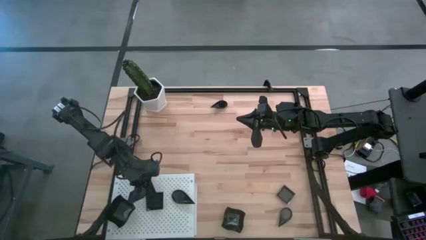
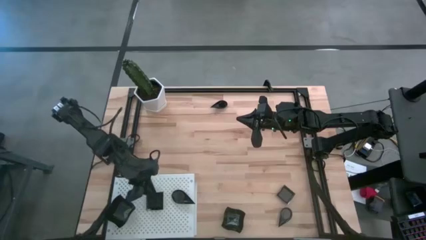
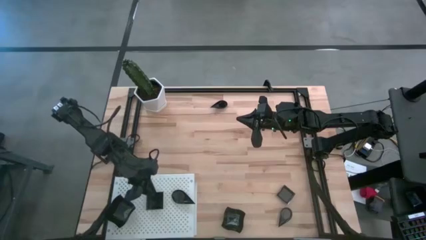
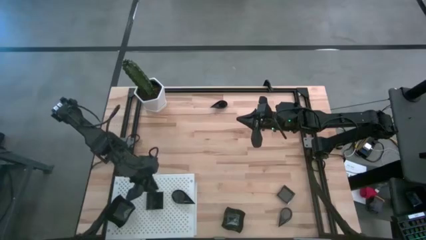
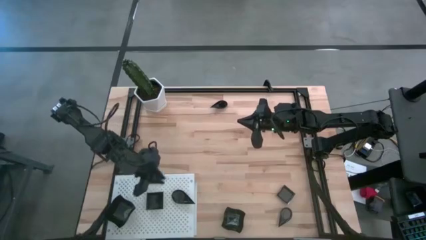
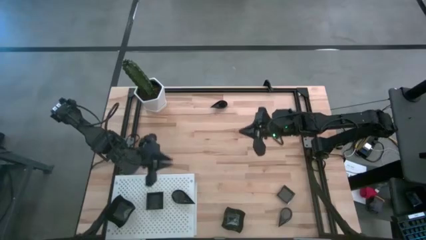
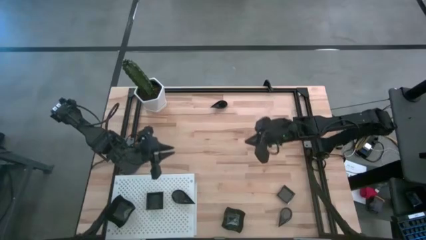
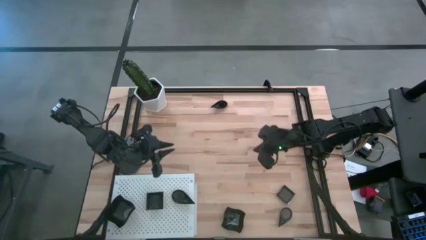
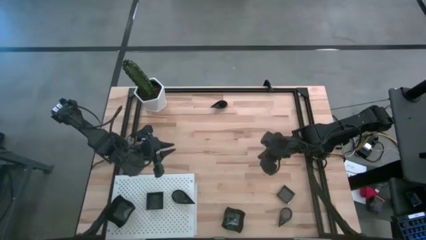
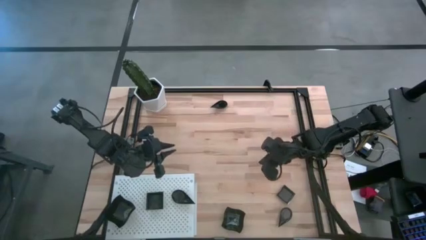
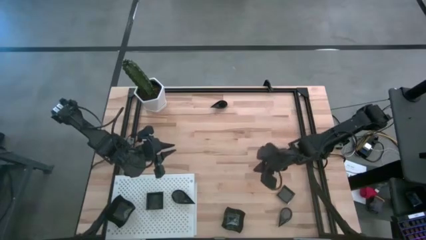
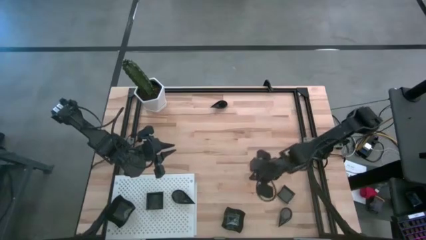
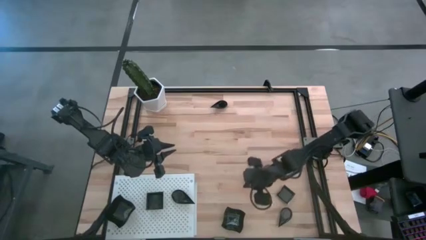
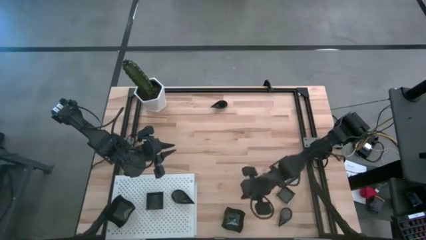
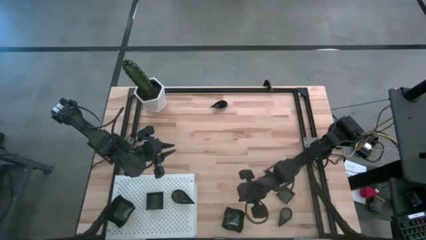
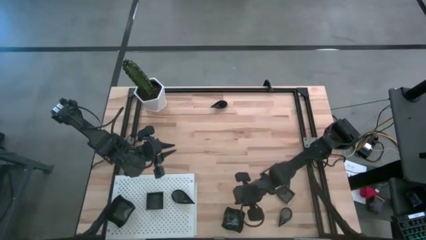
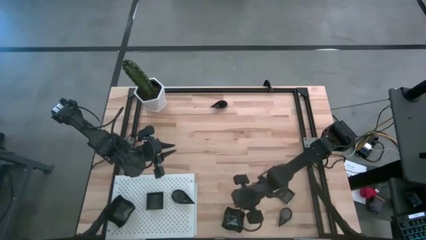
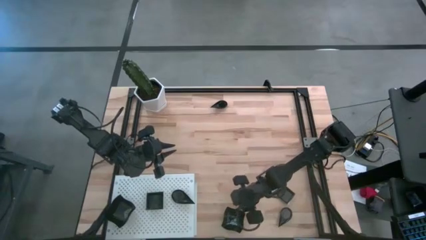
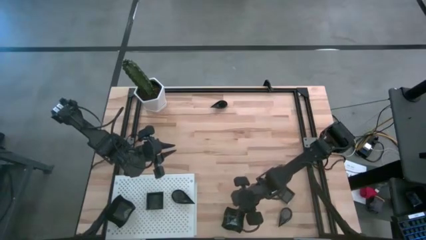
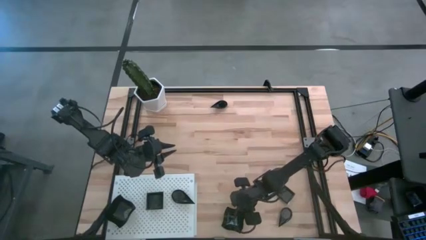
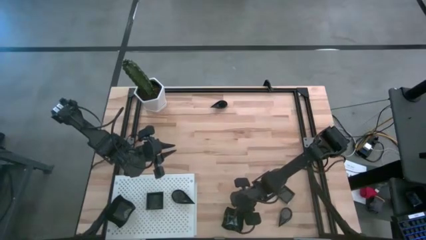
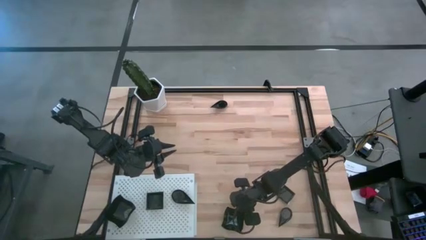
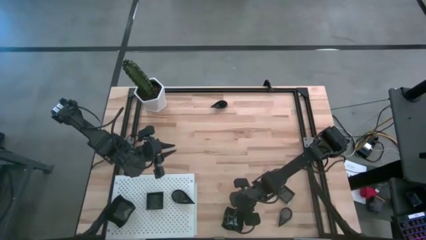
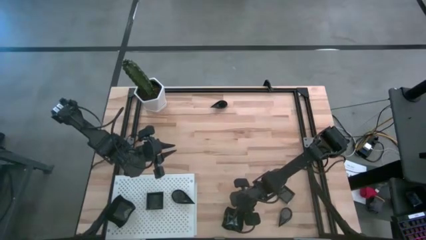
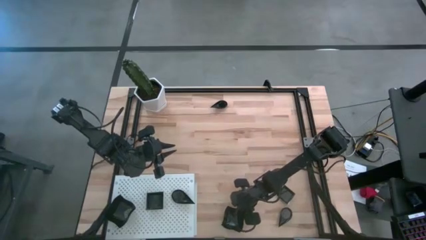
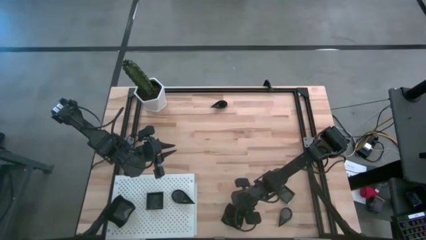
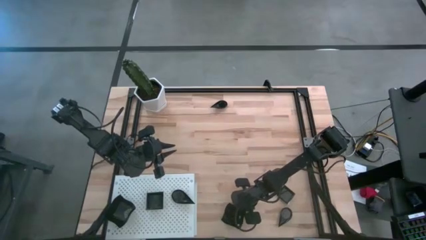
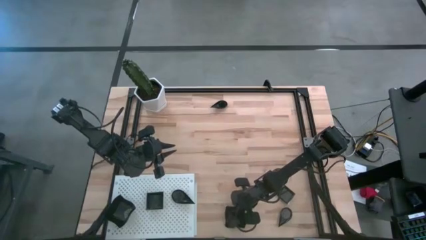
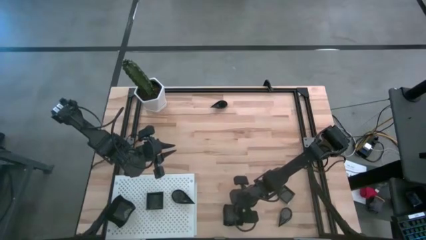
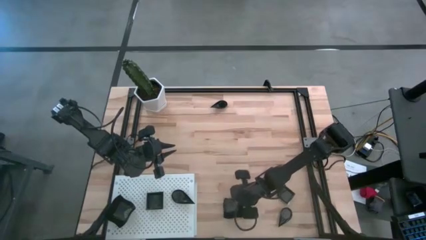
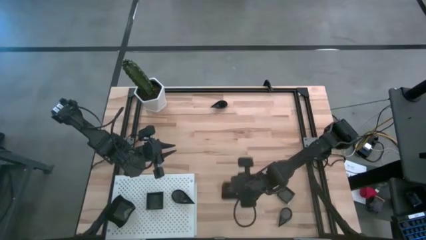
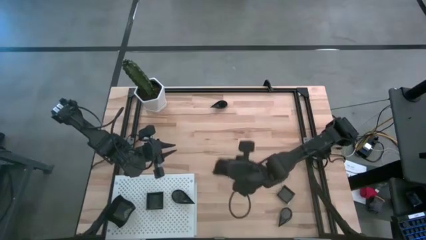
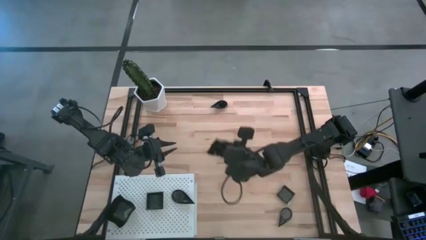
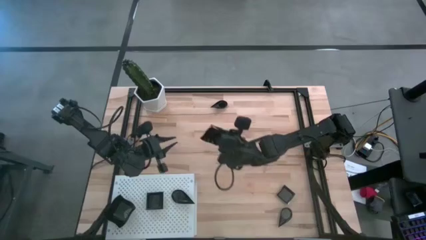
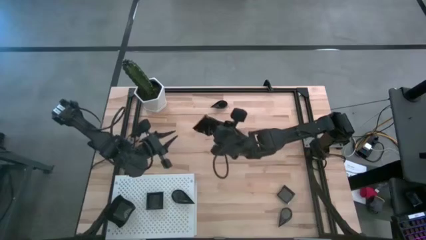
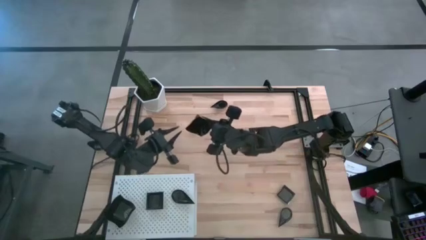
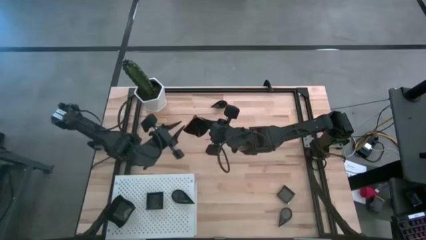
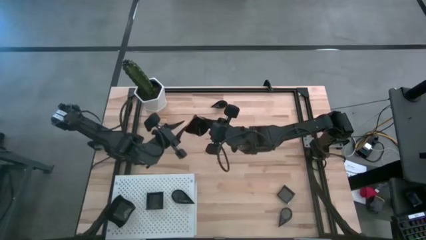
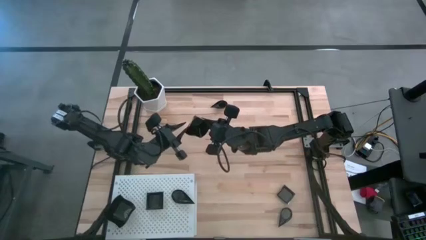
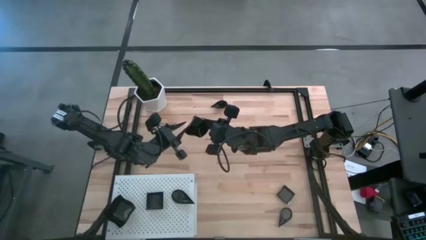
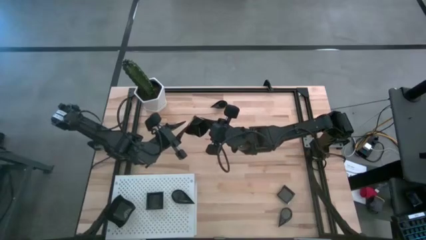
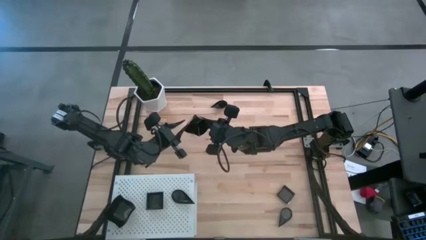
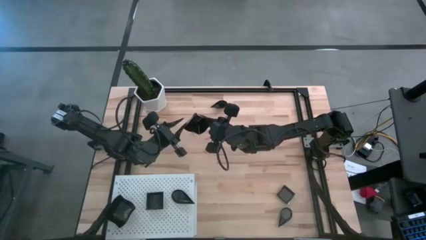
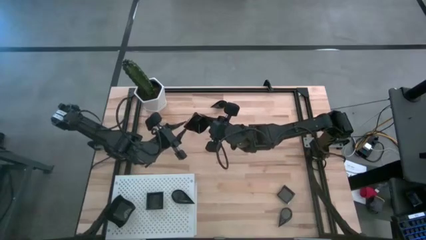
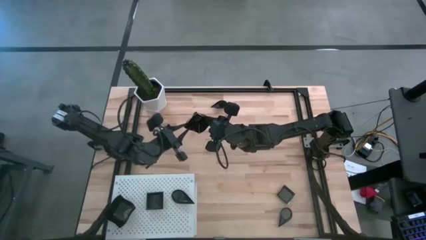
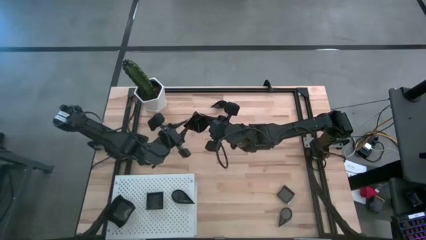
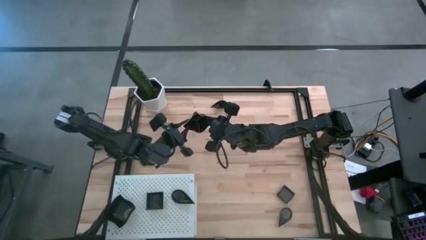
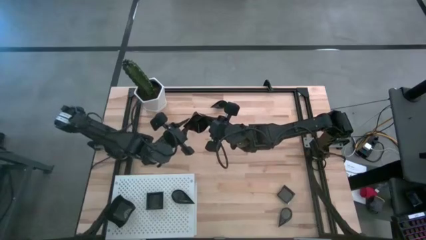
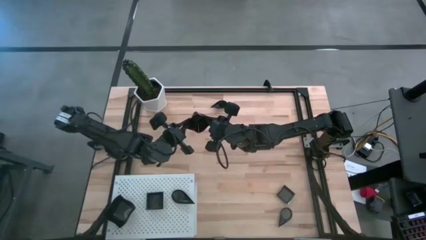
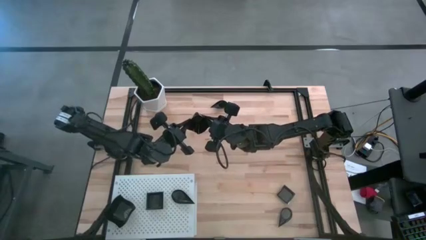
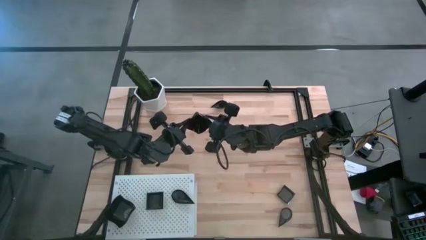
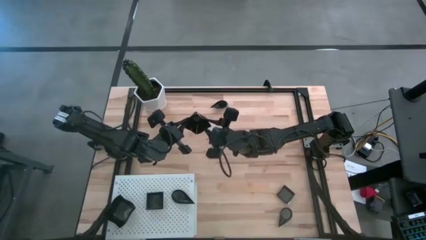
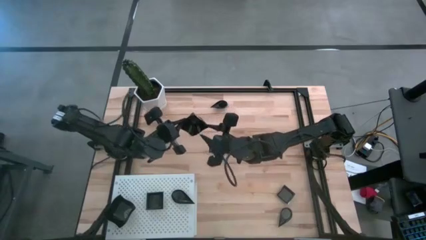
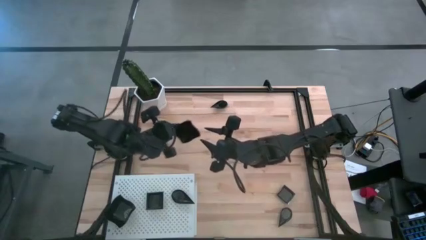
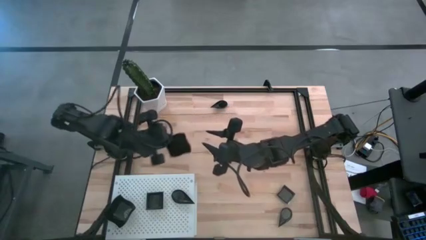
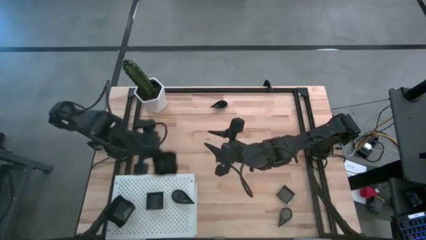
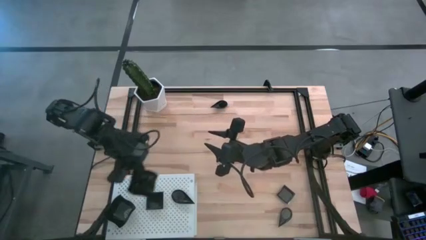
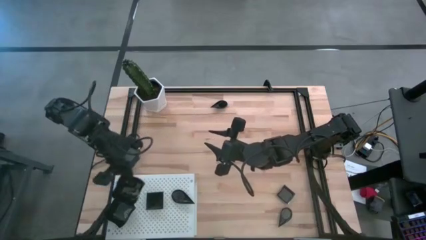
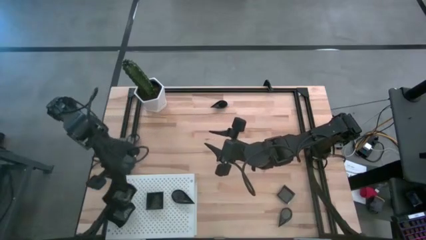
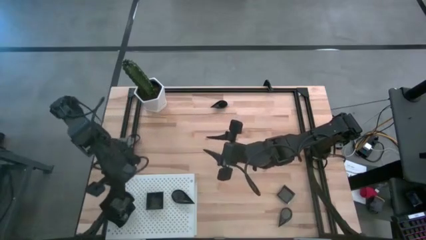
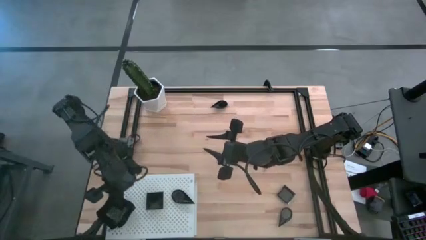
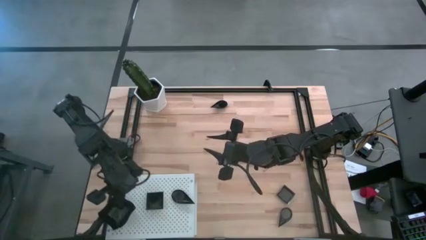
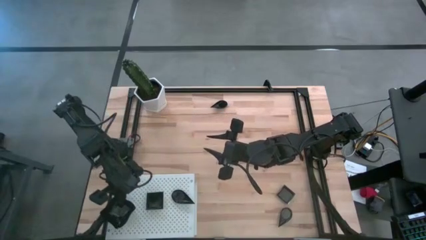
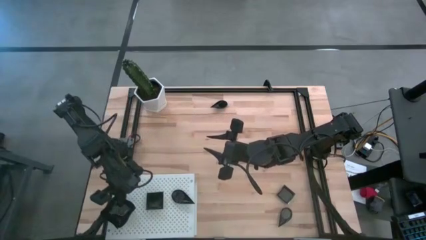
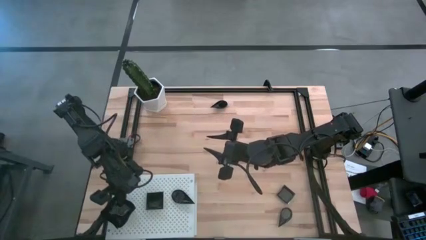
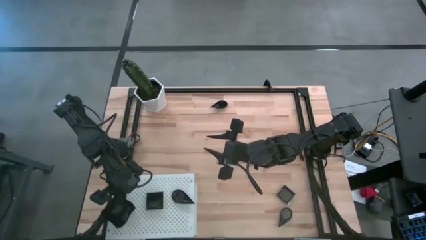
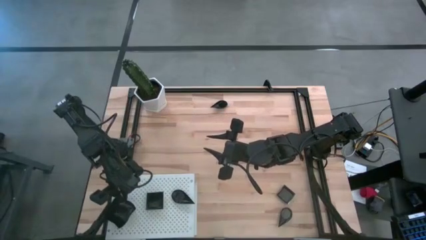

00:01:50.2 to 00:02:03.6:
Task: Pick & Place Mini shaped plates
Stack the distorted square plate on top of the other distorted square plate on the shelf
